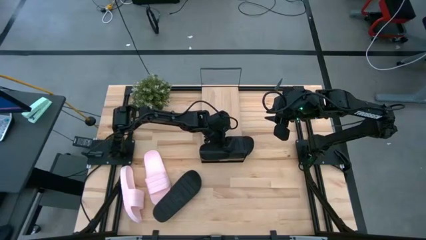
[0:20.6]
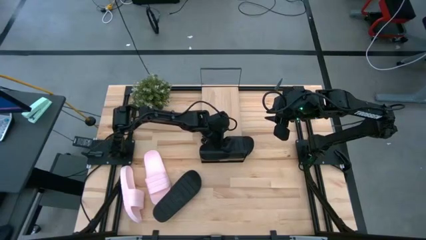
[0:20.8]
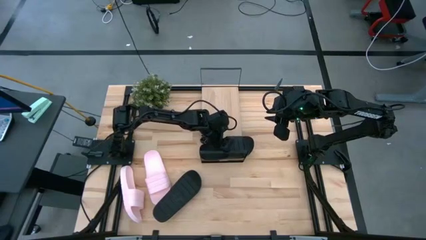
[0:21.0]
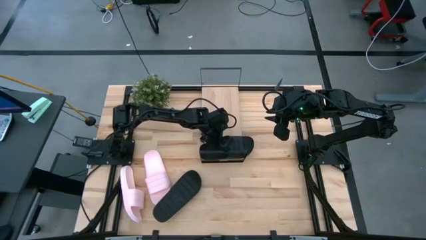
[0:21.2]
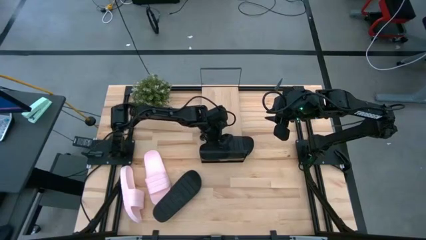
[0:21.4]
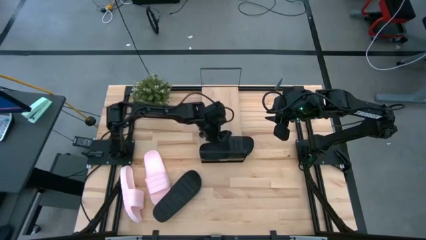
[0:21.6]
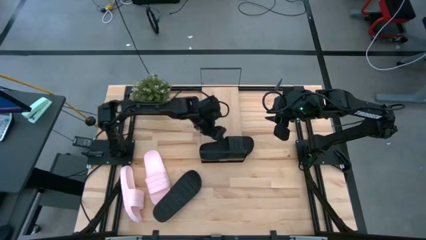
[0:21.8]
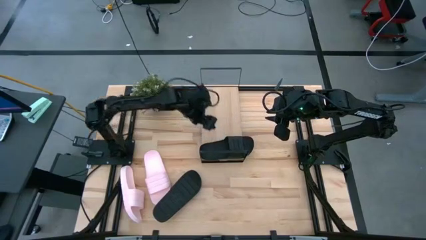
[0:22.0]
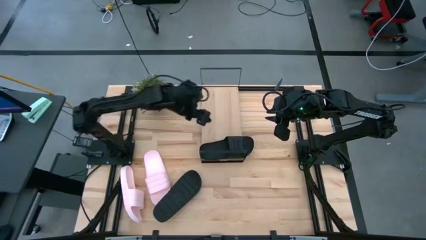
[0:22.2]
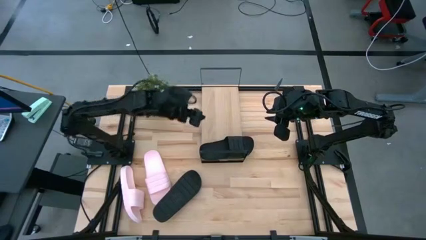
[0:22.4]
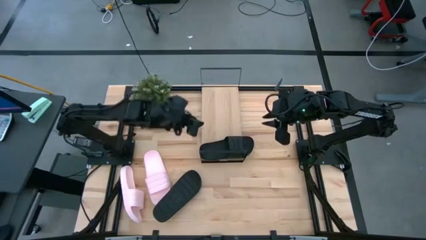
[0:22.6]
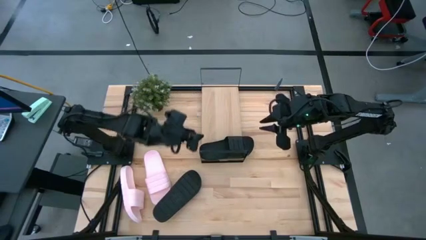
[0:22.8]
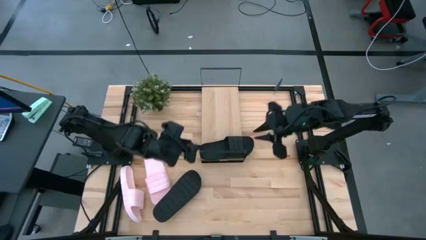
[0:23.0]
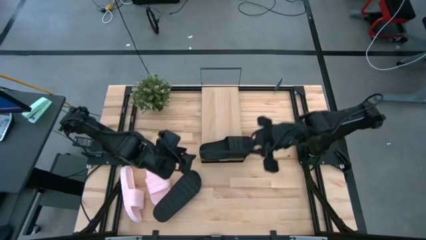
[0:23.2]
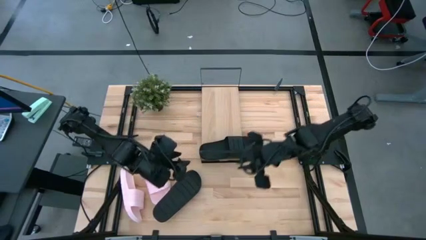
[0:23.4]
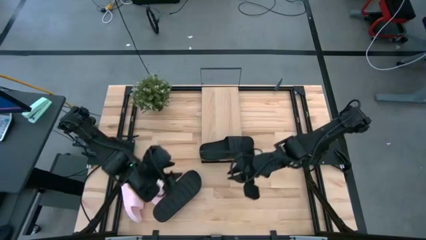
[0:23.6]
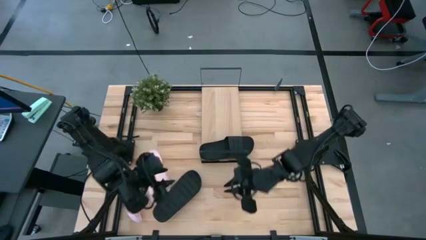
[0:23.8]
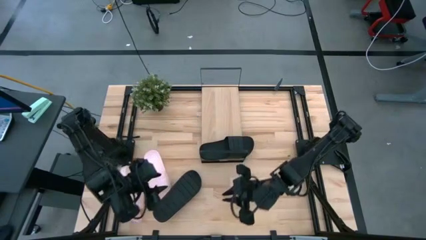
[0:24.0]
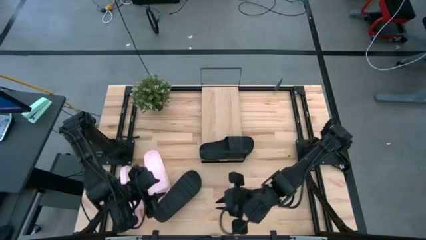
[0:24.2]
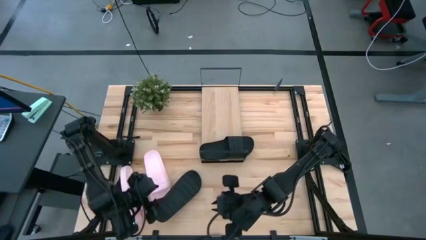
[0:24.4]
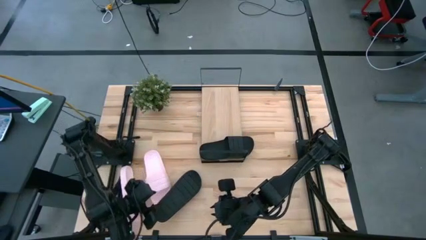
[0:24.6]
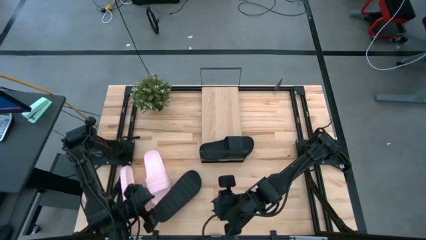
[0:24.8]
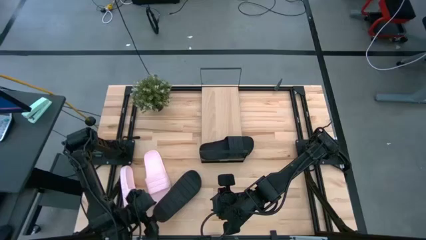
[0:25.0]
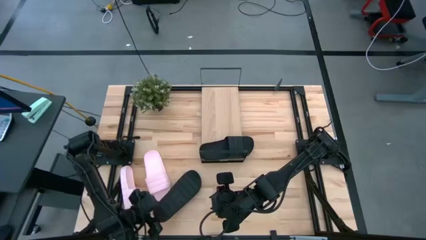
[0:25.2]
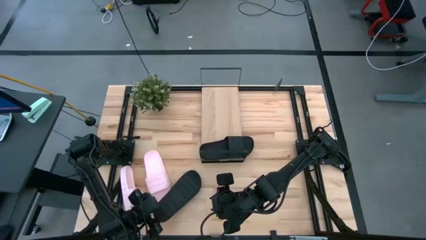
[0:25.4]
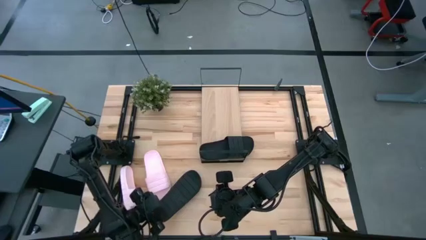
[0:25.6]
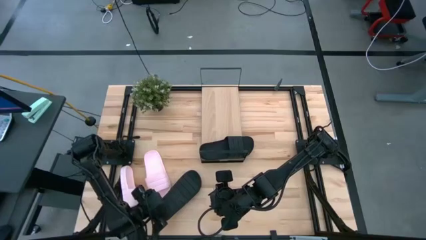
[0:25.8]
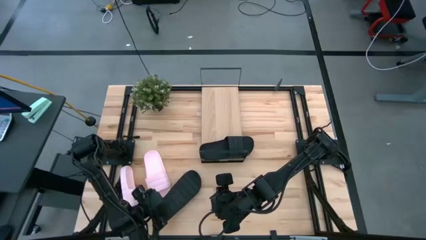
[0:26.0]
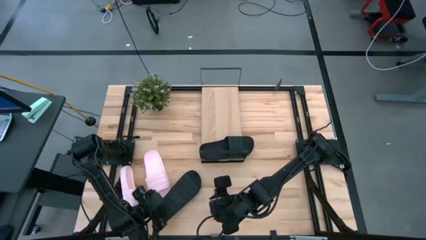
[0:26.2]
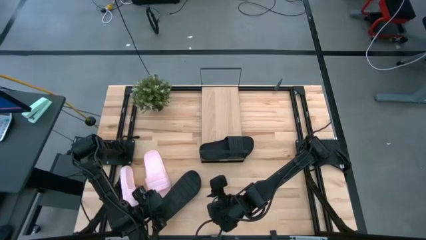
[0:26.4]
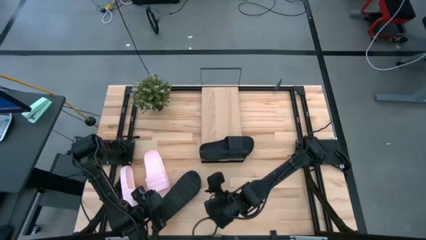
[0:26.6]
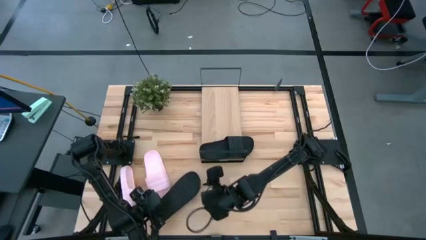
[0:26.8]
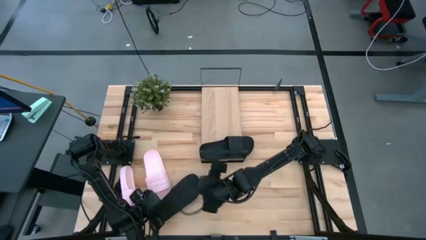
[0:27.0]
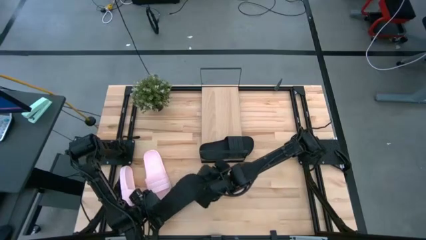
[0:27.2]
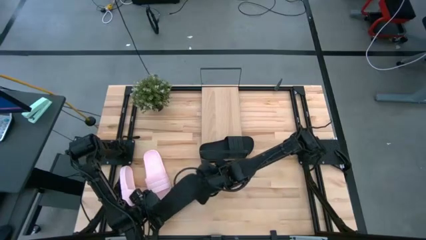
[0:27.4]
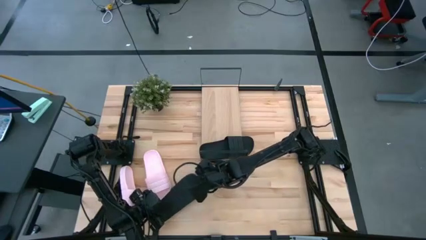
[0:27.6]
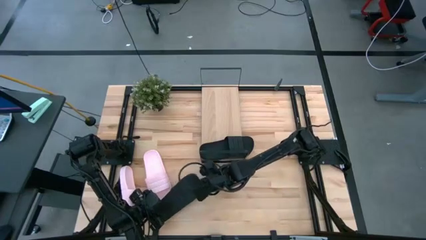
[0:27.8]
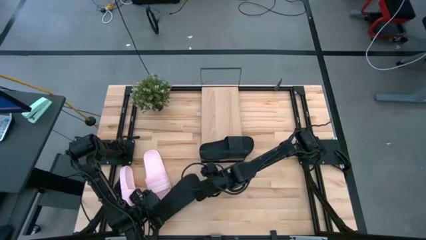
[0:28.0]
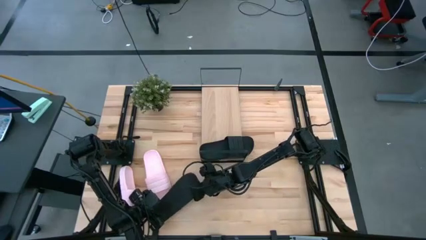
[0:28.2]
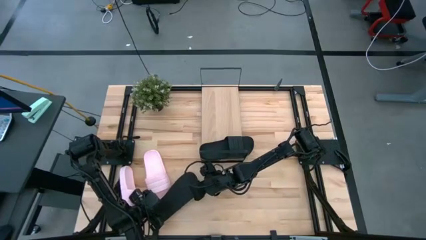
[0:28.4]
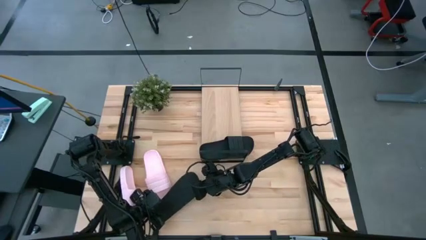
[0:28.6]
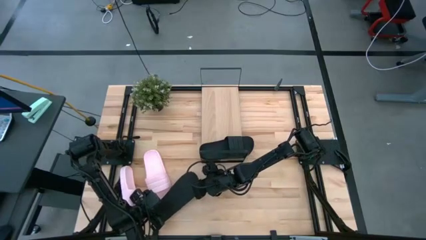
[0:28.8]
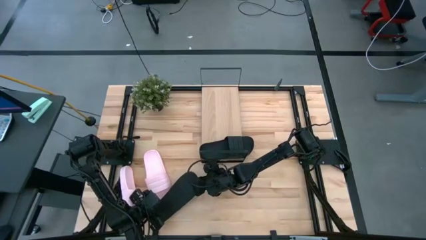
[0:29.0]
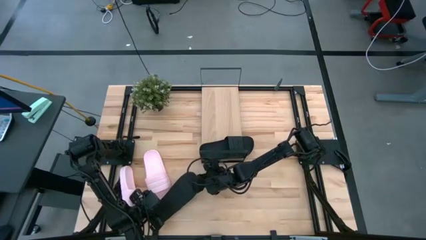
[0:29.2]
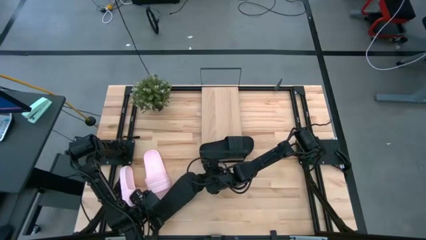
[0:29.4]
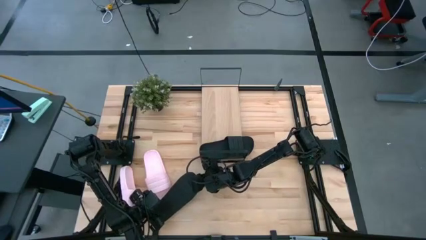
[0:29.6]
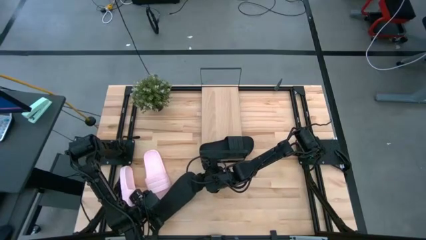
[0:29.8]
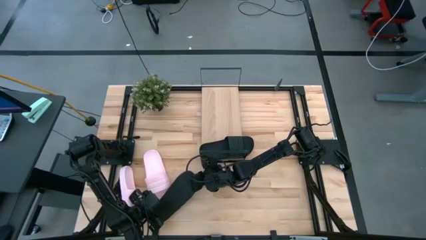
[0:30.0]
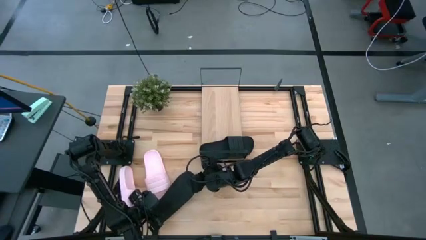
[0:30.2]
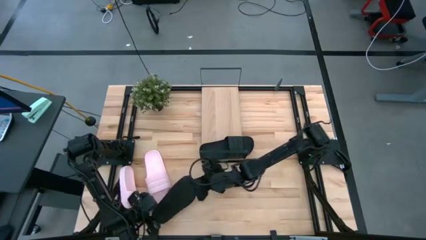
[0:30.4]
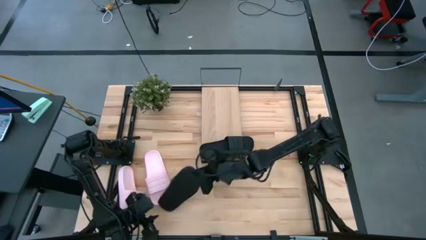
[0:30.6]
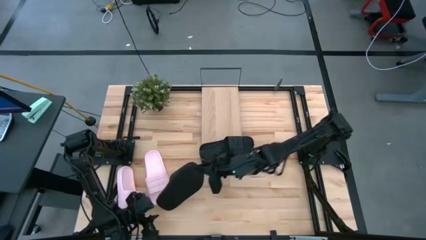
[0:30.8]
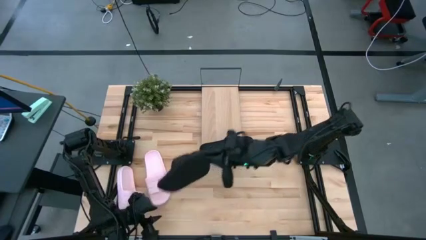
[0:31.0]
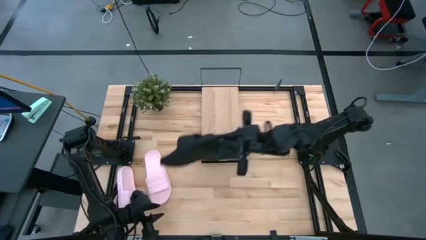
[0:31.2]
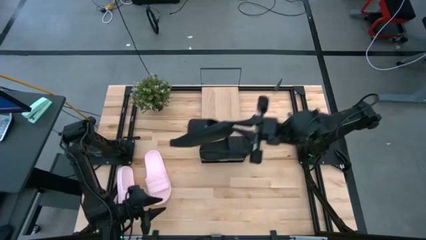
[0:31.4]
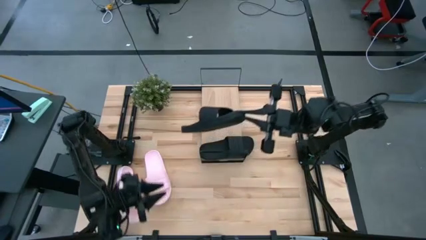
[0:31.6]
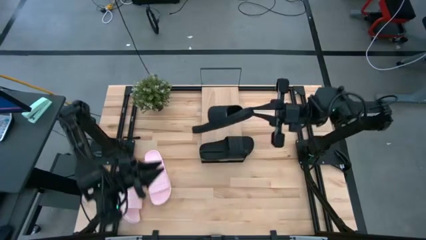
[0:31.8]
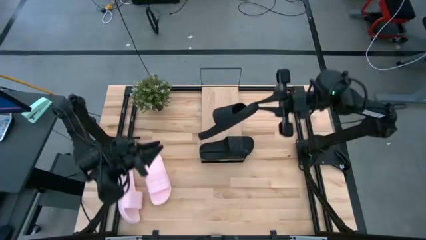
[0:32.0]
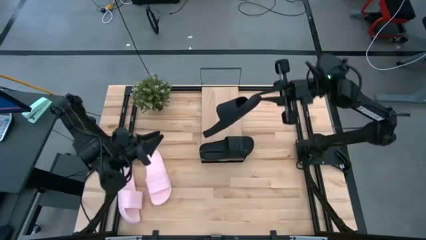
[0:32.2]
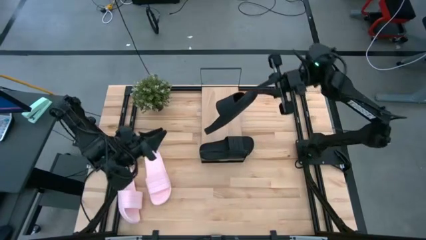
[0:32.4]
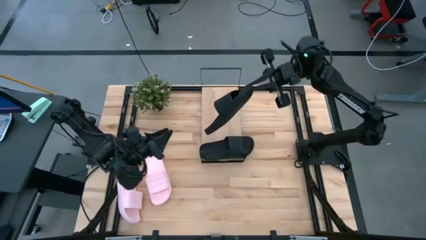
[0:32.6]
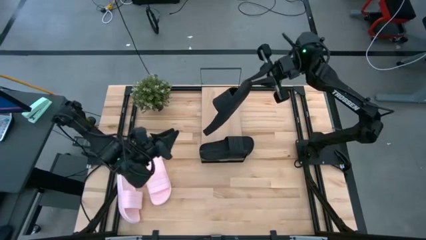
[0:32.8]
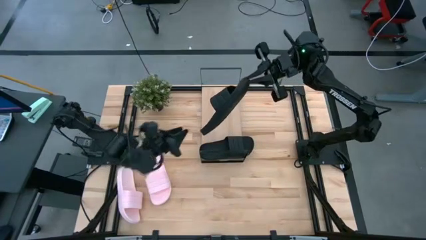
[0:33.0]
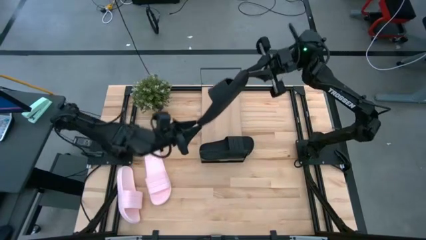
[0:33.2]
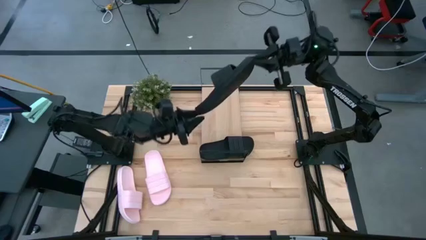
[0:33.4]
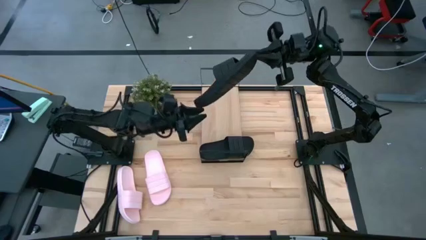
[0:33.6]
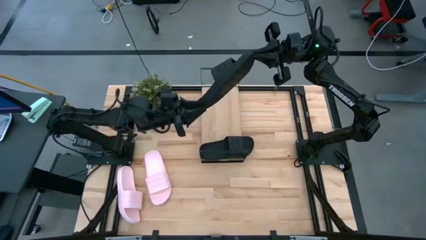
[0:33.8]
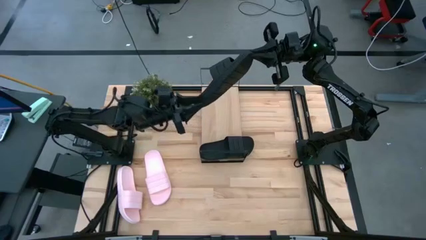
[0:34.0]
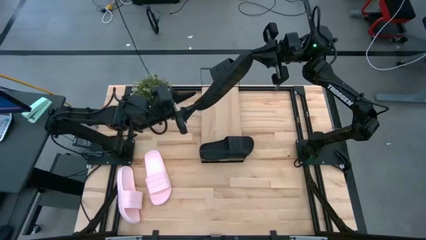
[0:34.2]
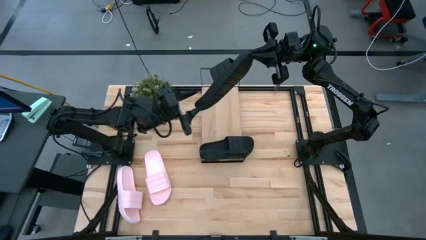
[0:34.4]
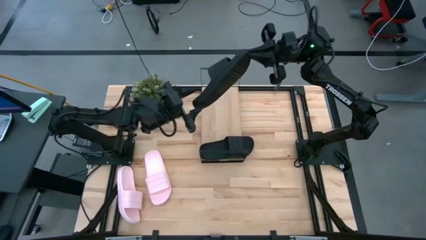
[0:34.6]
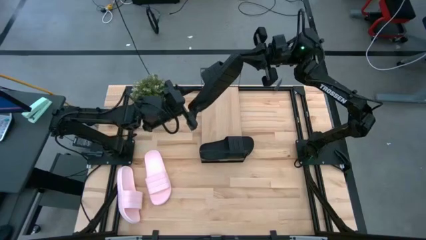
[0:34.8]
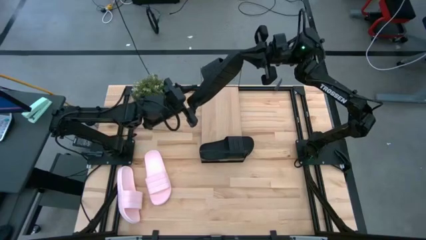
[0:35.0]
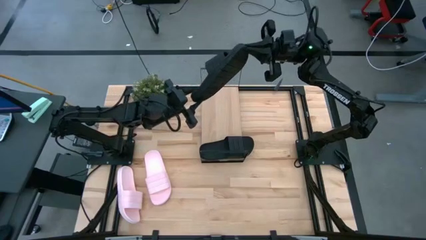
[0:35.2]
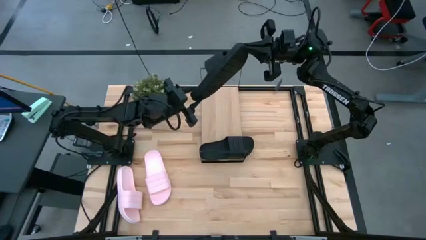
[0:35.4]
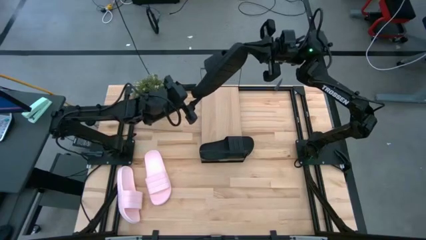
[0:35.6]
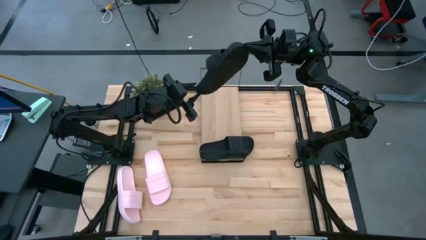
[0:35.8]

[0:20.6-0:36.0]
Task: Pick and place slides into the shelf
Put the black slipper on the shelf

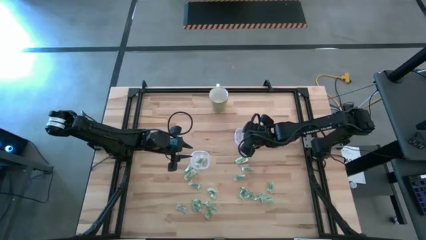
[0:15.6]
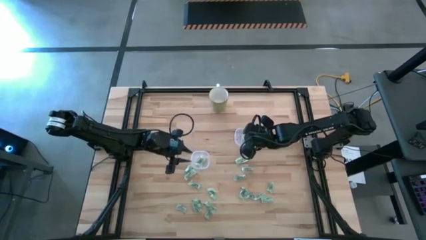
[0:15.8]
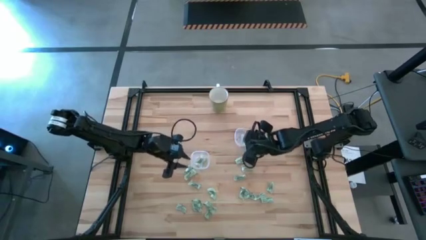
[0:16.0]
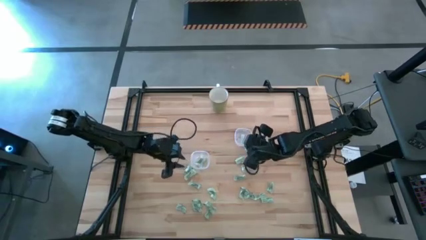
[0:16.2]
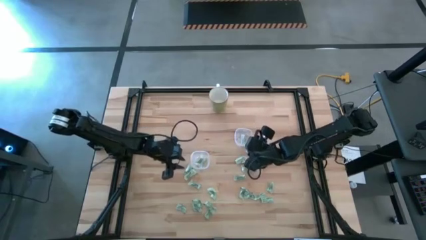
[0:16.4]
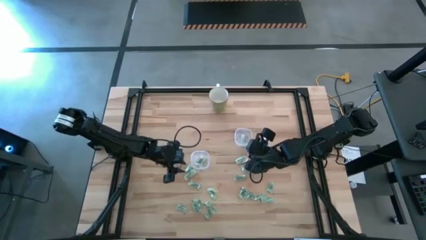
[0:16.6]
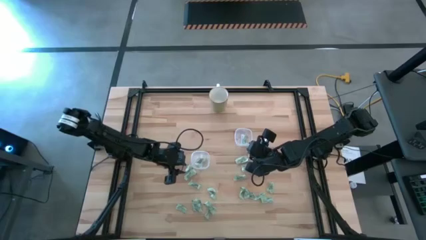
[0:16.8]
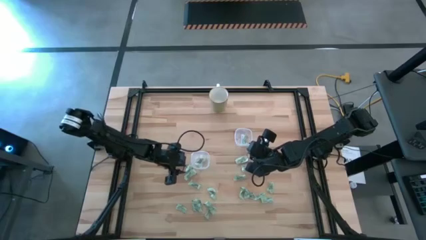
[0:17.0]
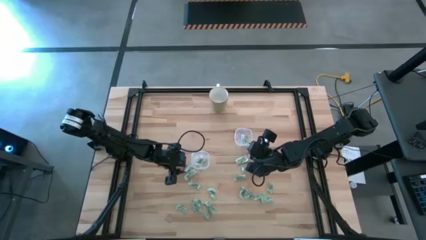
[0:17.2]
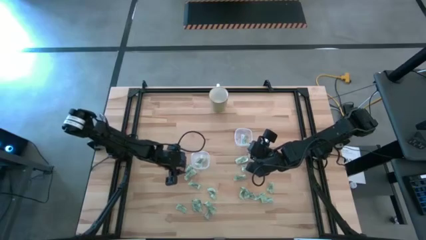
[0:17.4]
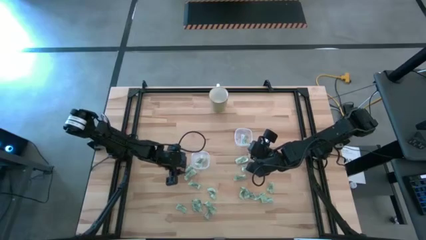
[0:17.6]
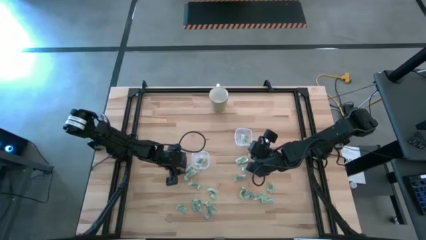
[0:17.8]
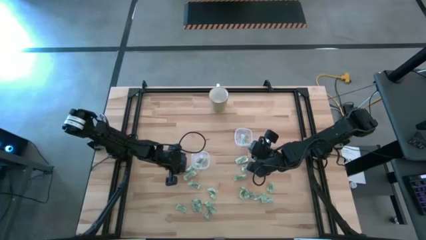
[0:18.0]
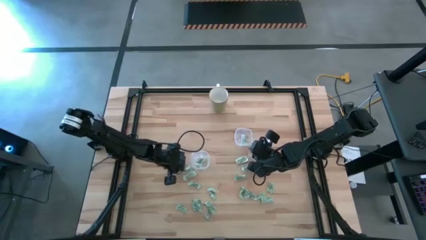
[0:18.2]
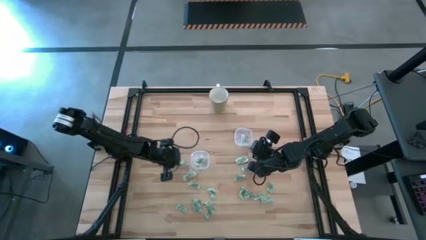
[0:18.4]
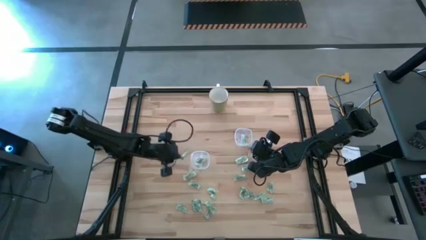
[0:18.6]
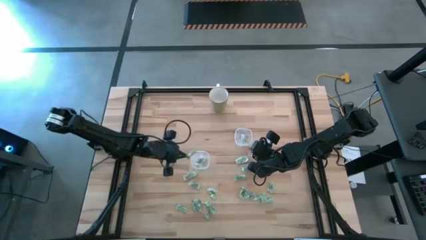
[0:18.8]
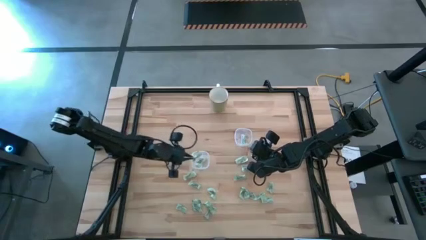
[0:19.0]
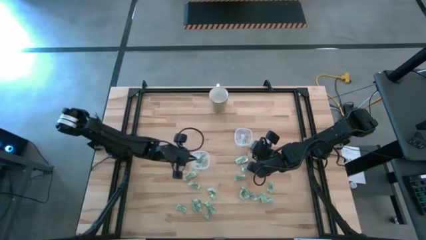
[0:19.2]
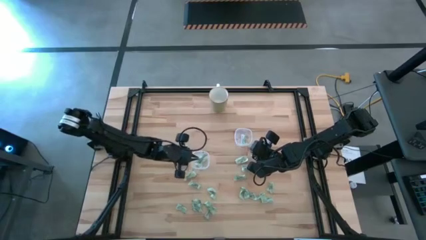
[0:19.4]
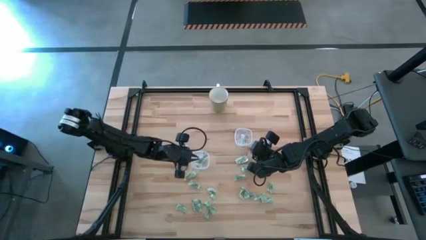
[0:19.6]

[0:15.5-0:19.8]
Task: Pick and place Stevia / Truvia into bins
Put the green stevia packet into the left transparent container
